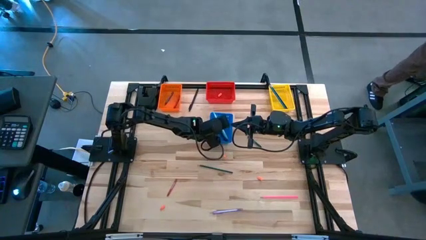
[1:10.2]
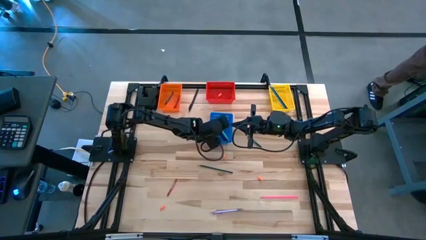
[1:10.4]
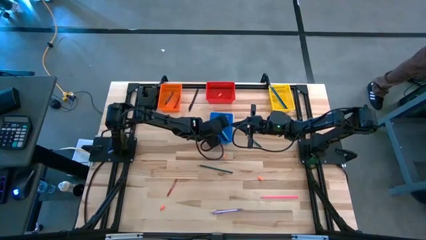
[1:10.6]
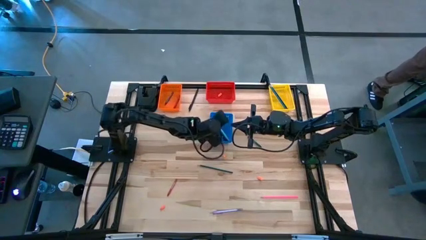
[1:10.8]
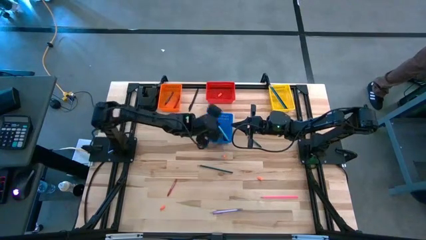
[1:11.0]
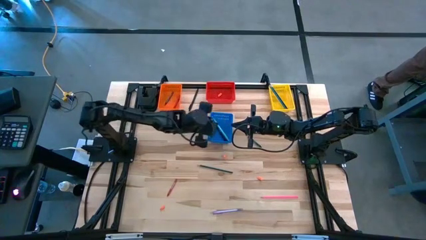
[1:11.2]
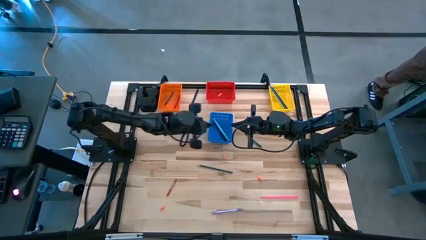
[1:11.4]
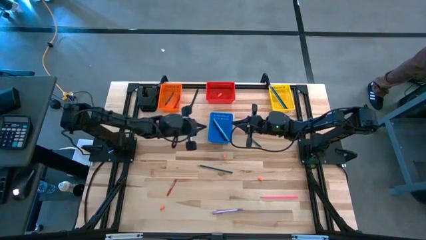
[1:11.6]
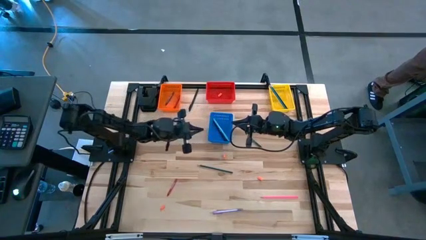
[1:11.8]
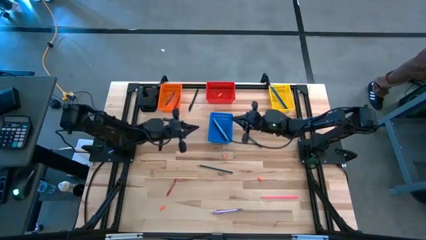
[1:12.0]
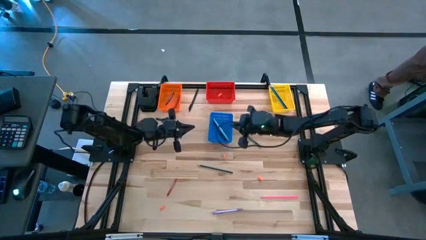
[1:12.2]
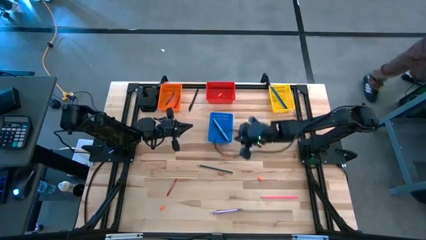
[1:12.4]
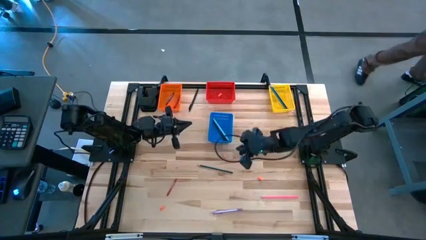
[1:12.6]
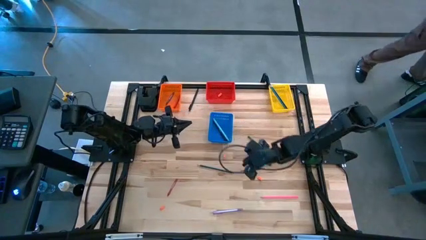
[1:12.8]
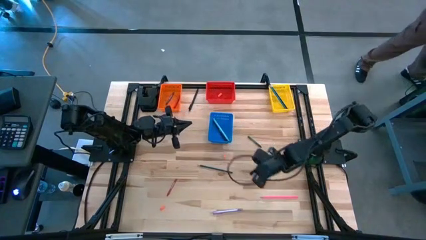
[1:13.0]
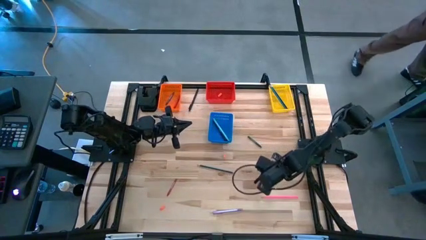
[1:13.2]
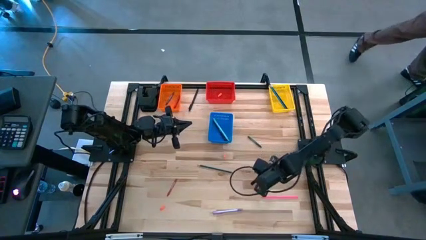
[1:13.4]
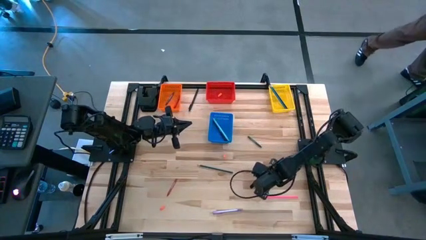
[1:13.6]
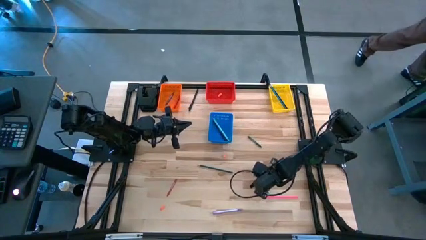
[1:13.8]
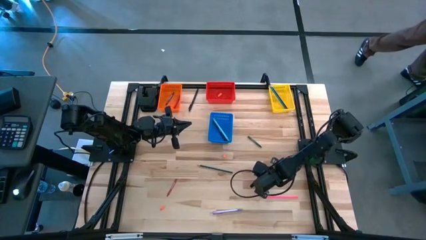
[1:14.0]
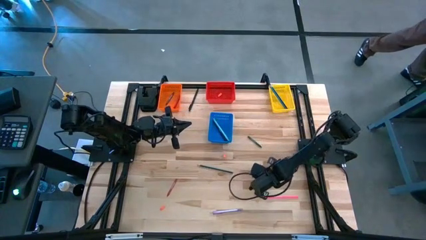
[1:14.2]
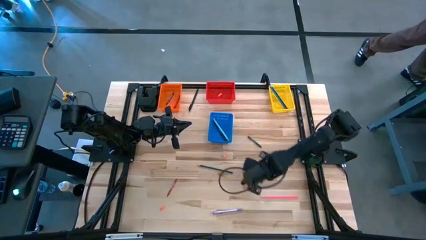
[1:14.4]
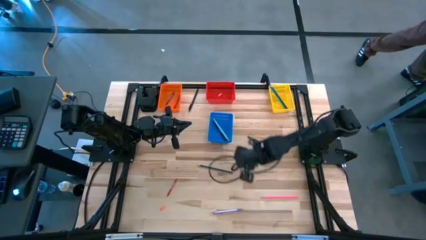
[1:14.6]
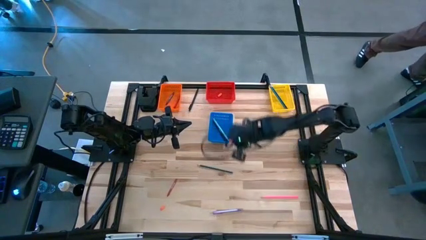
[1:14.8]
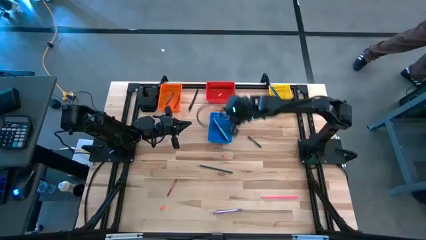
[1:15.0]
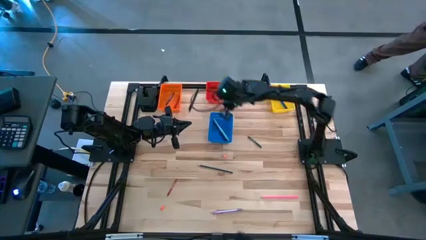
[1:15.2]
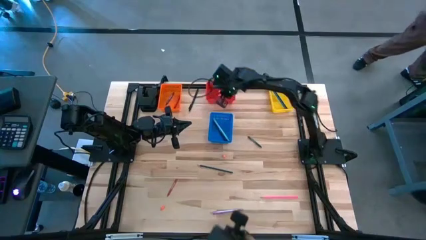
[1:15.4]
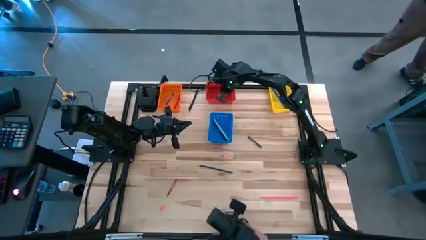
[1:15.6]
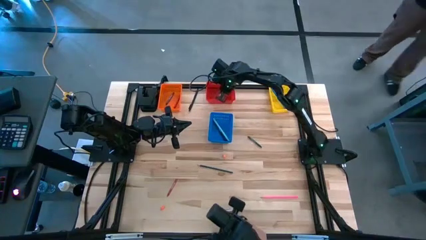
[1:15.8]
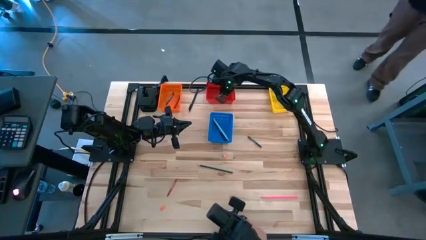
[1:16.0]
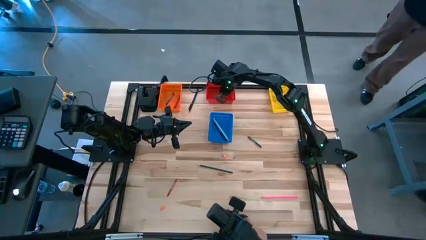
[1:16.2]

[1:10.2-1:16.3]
Task: Sort crayons/erasers/pens/pencils in bins
Put the orange eraser into the red bin

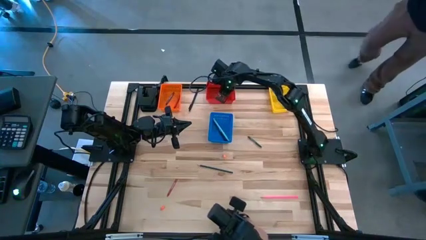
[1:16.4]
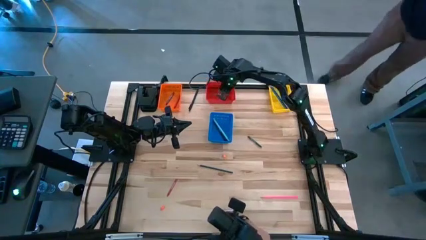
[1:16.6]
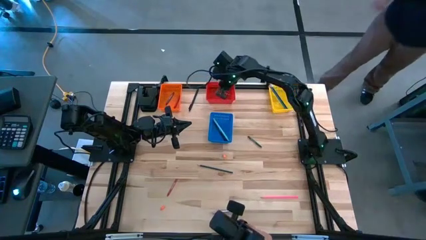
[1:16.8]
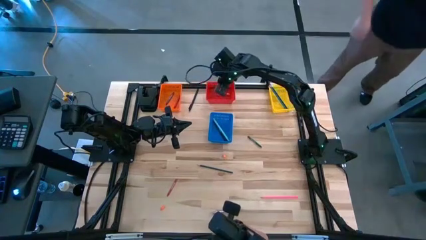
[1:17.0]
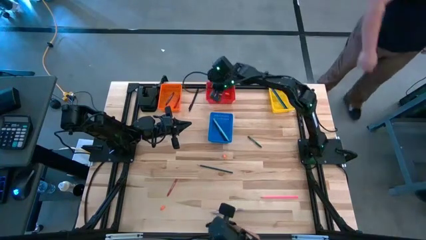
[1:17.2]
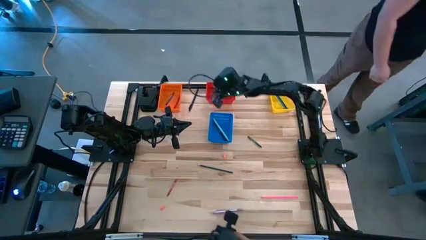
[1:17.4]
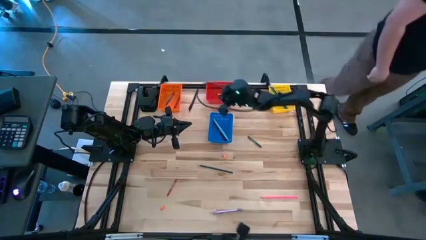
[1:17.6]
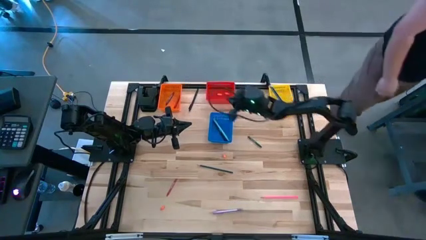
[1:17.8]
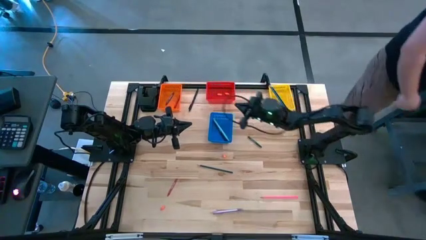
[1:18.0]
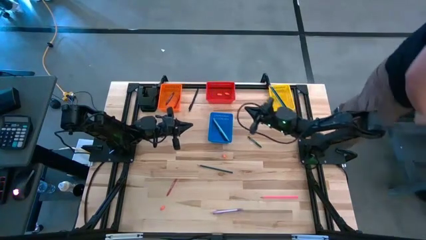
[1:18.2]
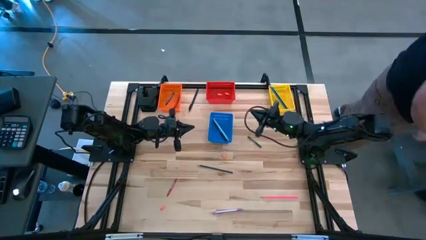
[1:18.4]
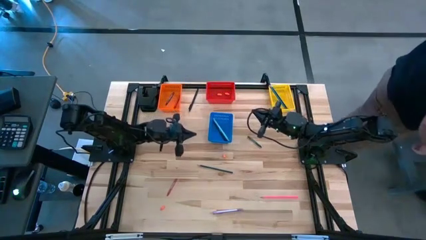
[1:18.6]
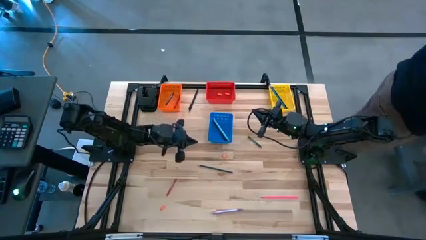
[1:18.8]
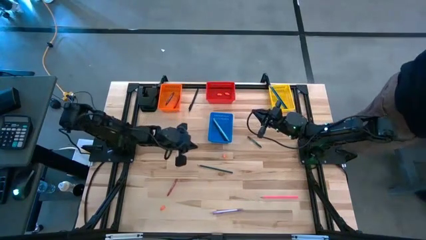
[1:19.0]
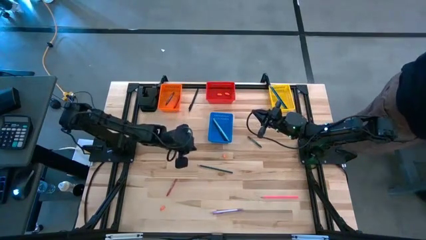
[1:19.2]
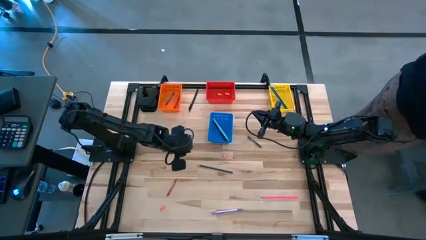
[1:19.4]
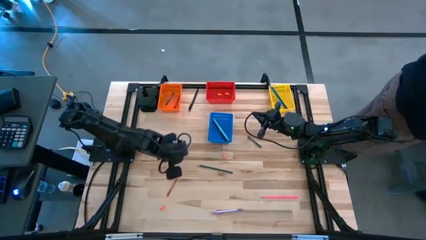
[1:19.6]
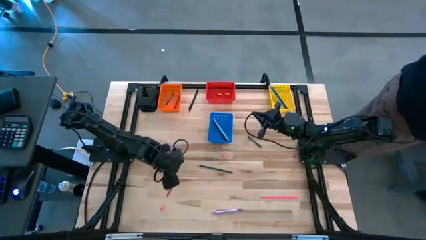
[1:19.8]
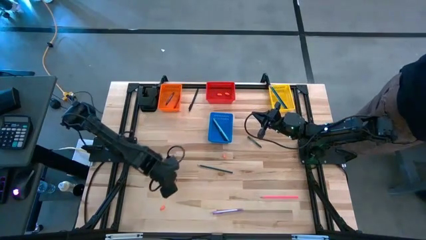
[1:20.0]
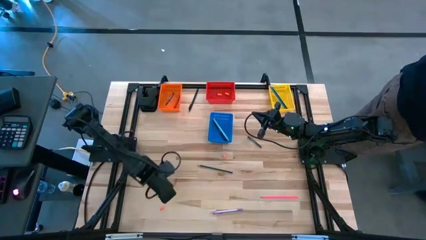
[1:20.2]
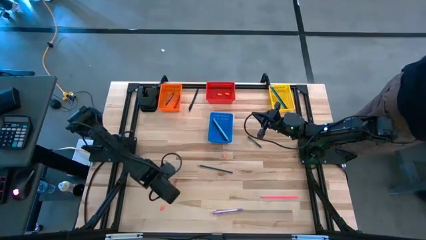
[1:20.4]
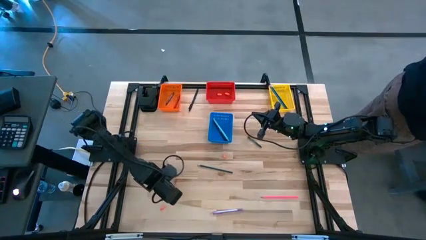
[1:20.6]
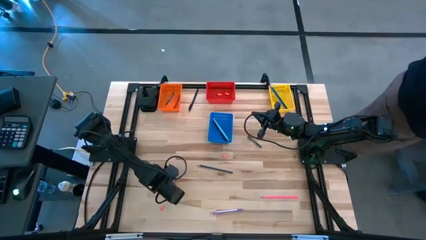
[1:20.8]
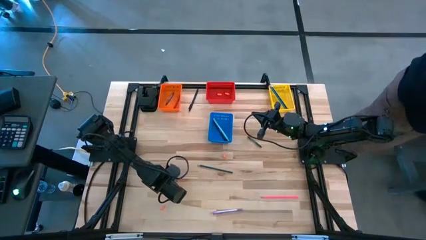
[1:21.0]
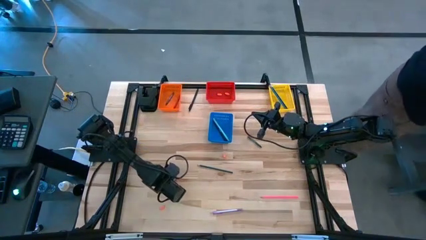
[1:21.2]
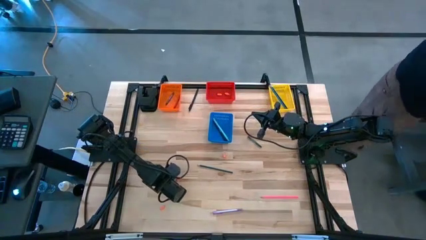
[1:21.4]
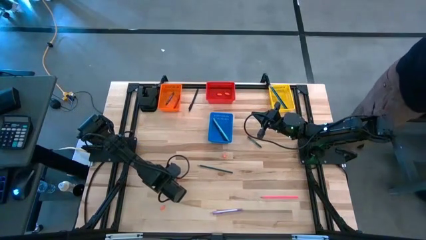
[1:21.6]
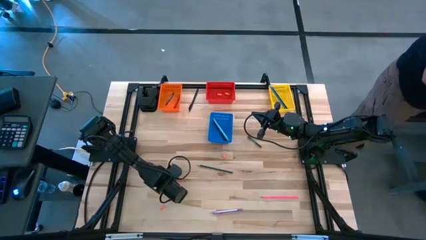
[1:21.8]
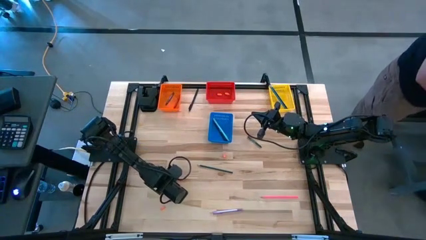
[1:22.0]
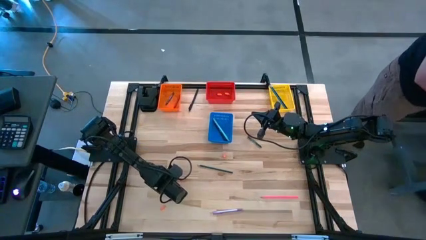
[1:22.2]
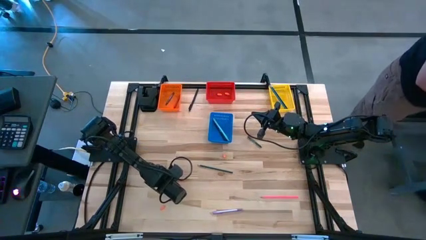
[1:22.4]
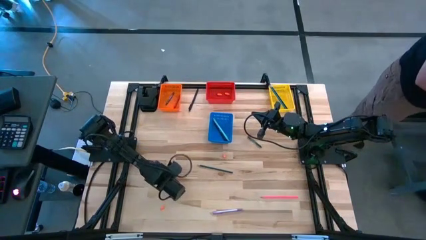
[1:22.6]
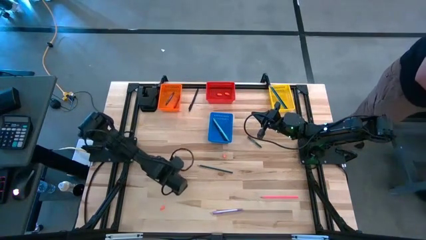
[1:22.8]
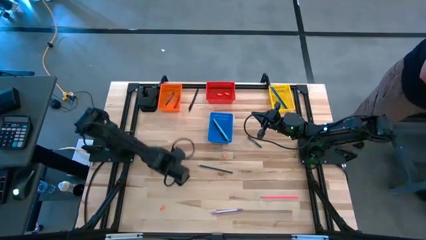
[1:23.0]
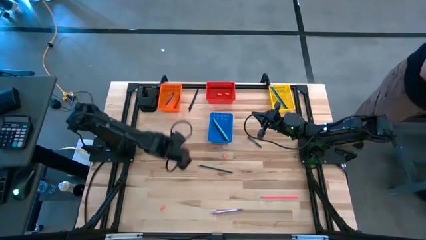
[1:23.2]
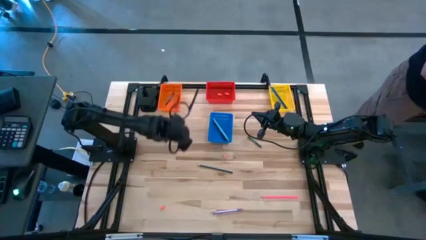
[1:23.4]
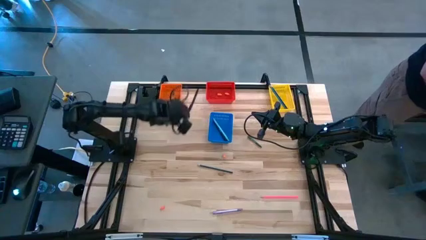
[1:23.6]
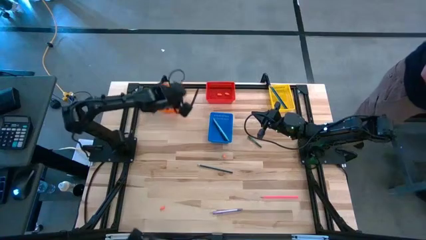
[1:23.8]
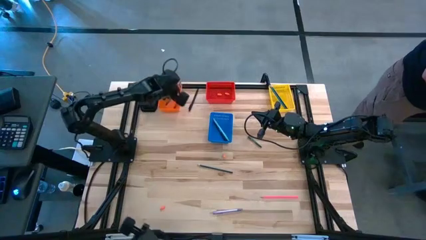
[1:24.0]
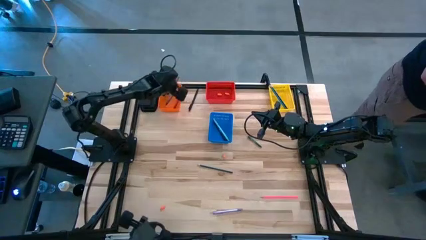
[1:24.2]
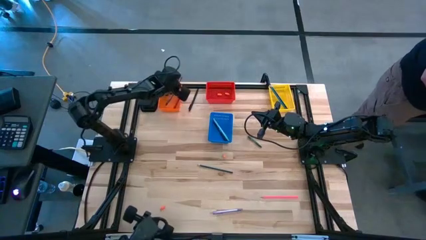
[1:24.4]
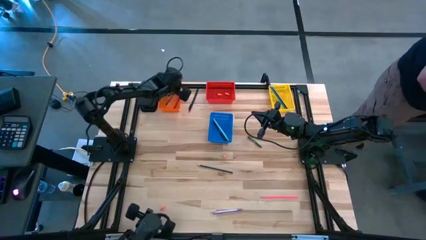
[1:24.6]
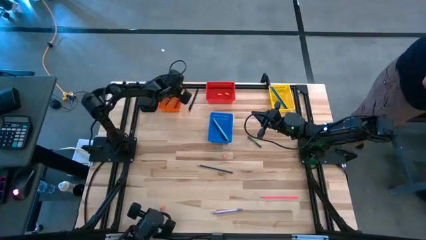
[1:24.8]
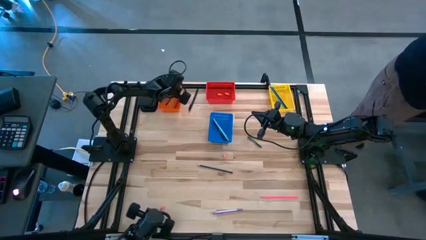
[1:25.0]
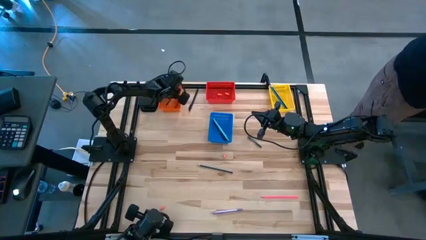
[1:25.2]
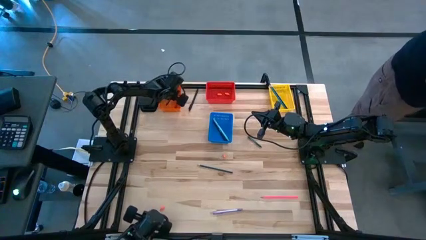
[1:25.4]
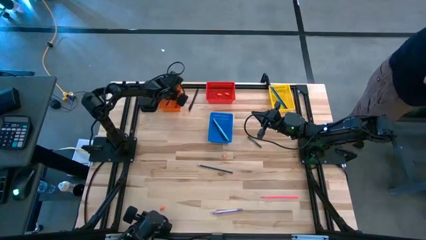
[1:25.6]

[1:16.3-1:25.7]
Put the red crayon into the orange bin
